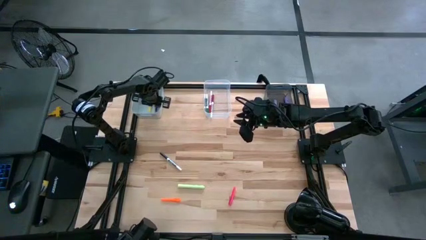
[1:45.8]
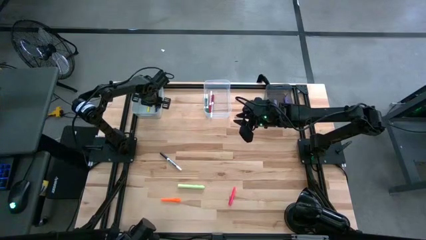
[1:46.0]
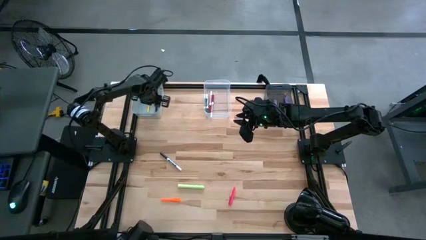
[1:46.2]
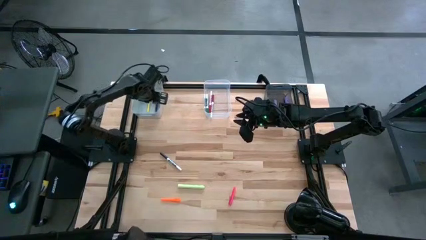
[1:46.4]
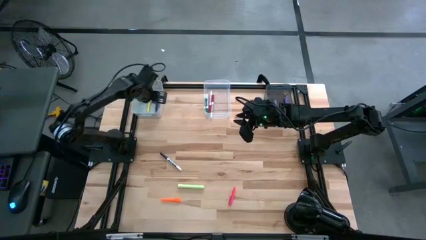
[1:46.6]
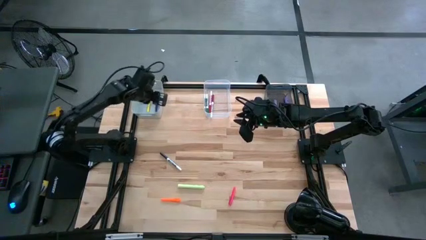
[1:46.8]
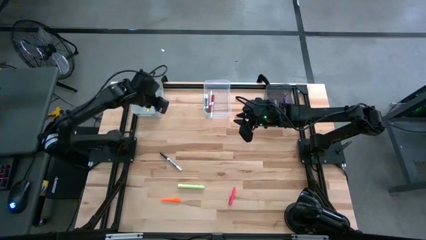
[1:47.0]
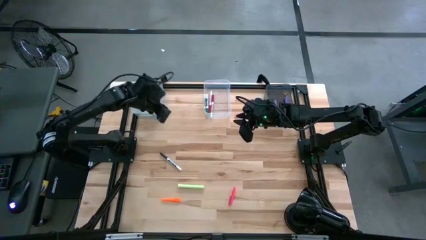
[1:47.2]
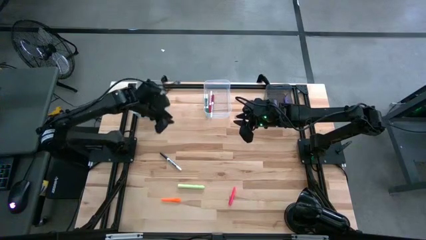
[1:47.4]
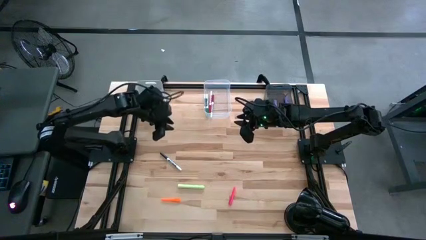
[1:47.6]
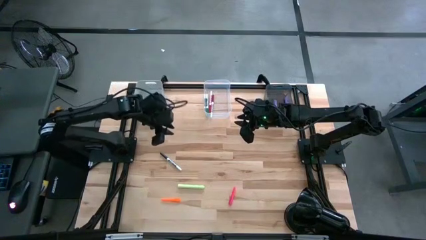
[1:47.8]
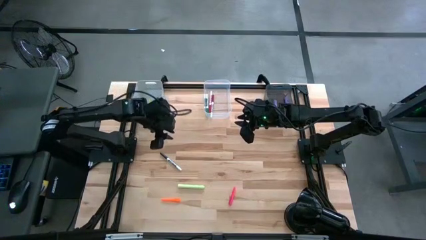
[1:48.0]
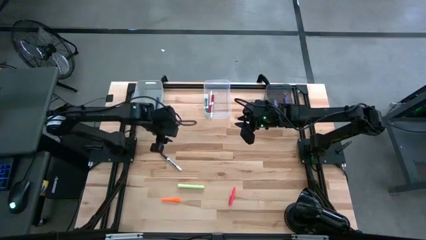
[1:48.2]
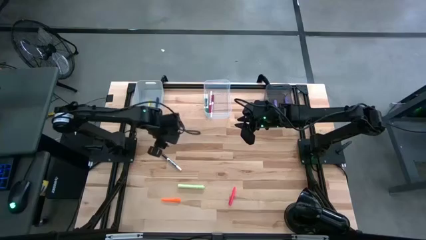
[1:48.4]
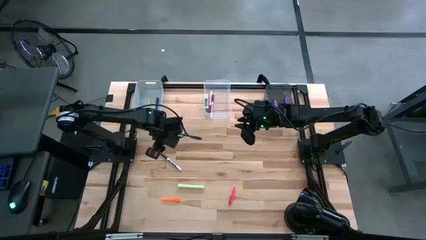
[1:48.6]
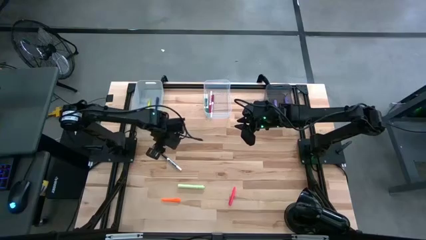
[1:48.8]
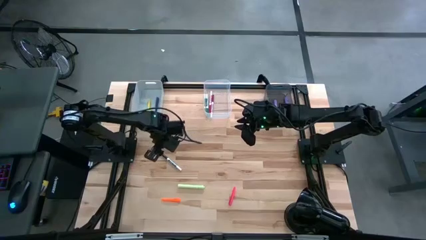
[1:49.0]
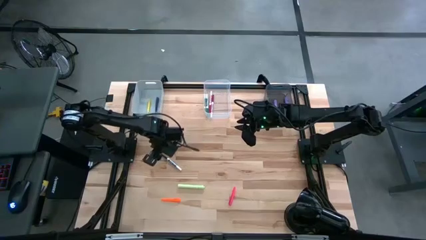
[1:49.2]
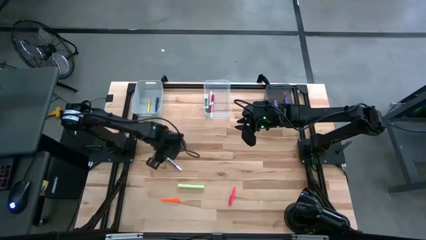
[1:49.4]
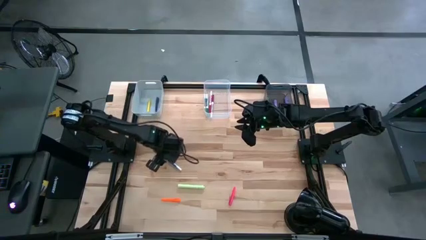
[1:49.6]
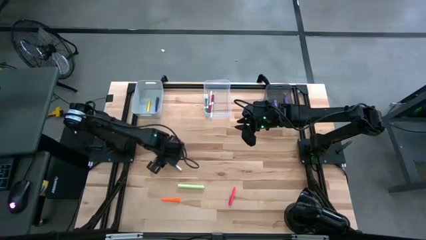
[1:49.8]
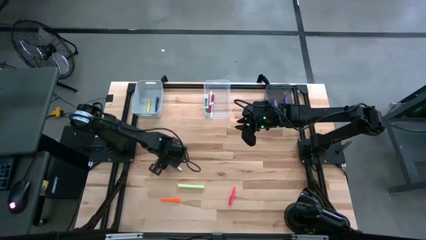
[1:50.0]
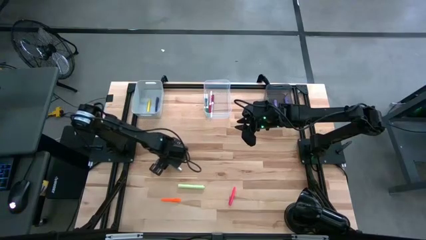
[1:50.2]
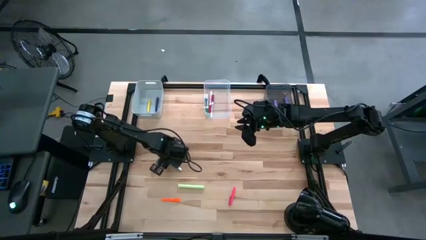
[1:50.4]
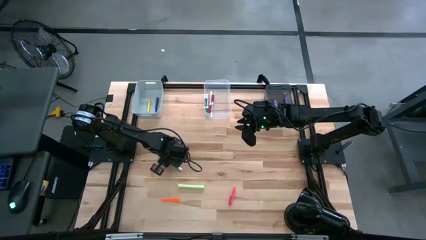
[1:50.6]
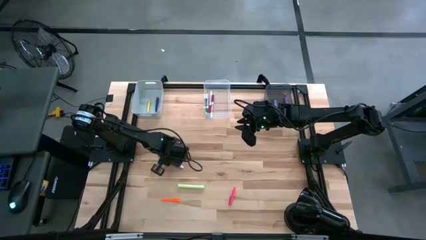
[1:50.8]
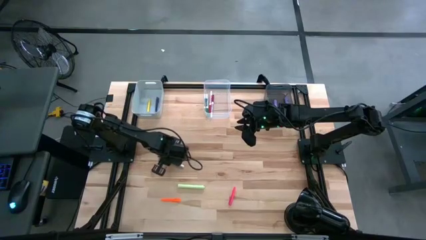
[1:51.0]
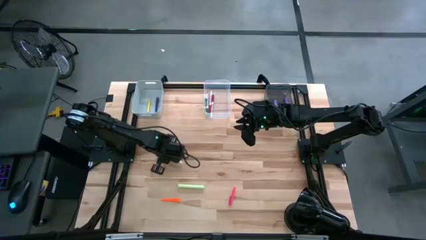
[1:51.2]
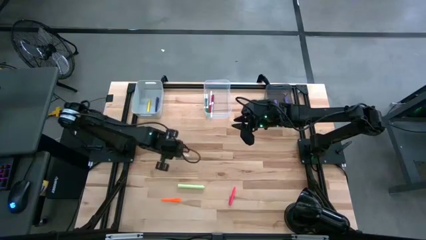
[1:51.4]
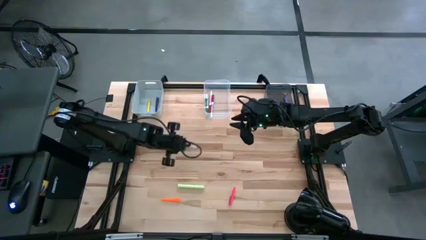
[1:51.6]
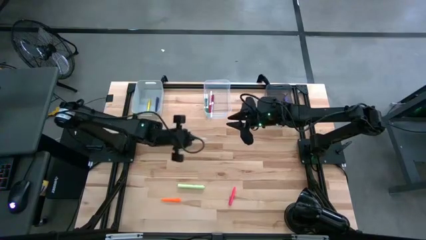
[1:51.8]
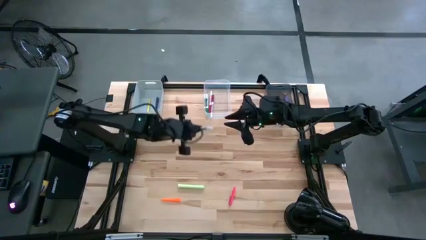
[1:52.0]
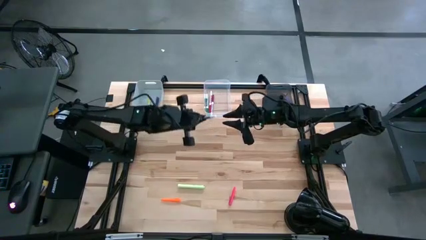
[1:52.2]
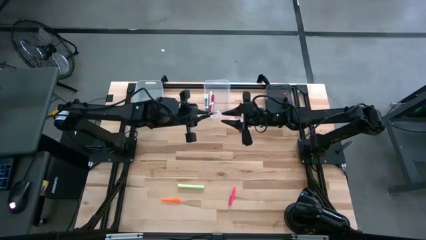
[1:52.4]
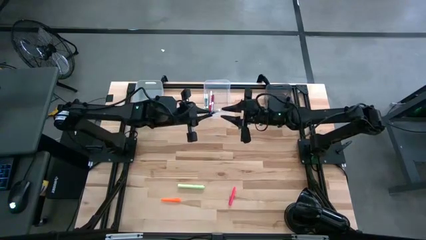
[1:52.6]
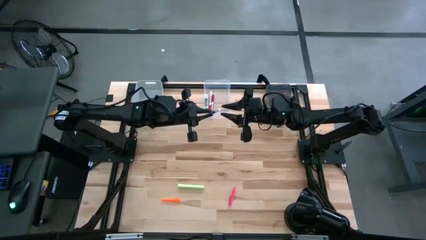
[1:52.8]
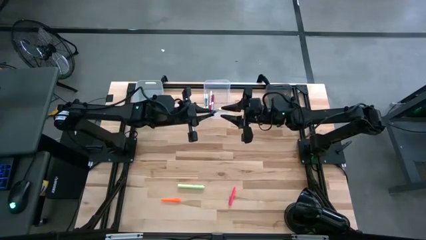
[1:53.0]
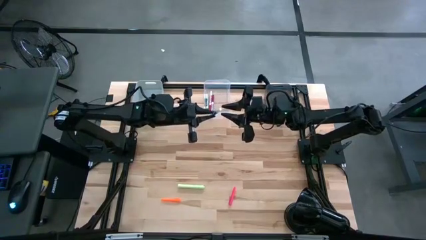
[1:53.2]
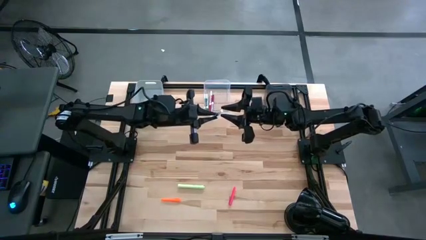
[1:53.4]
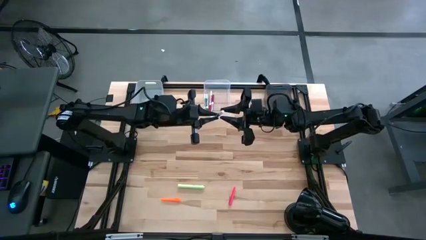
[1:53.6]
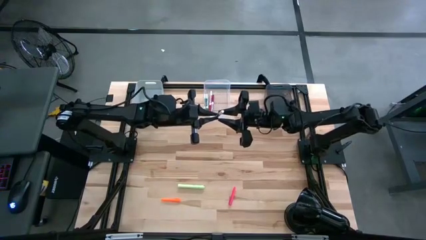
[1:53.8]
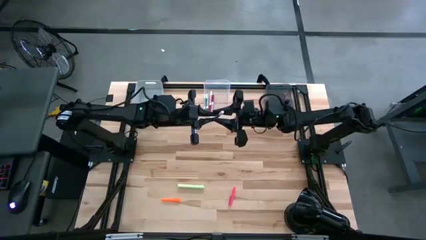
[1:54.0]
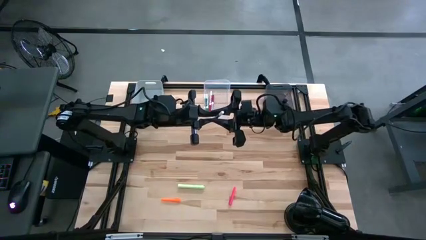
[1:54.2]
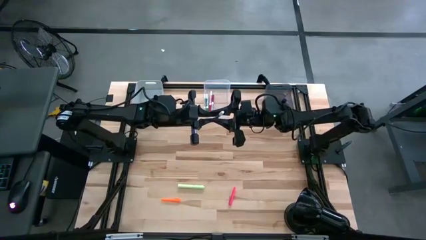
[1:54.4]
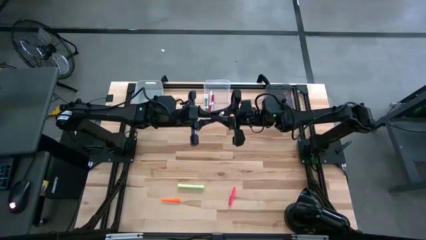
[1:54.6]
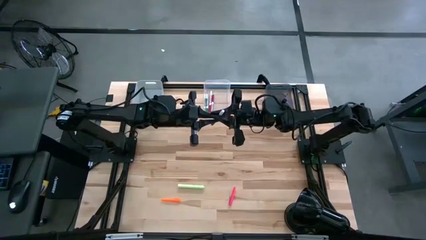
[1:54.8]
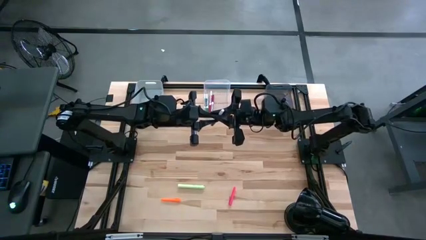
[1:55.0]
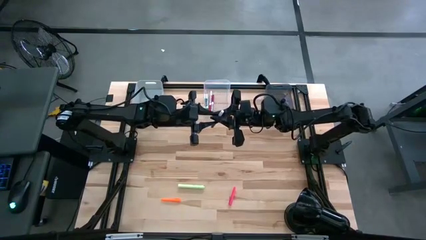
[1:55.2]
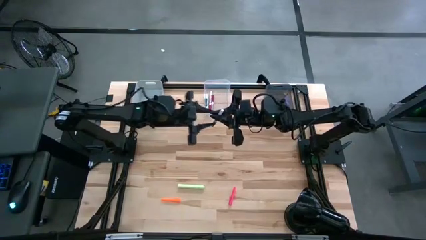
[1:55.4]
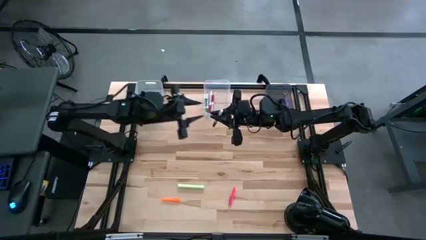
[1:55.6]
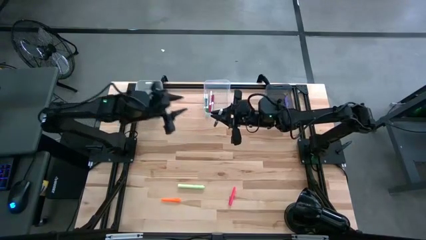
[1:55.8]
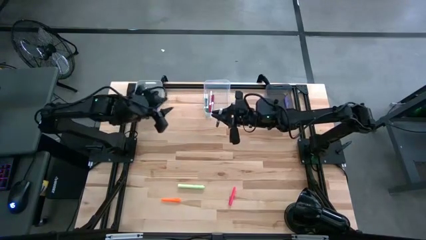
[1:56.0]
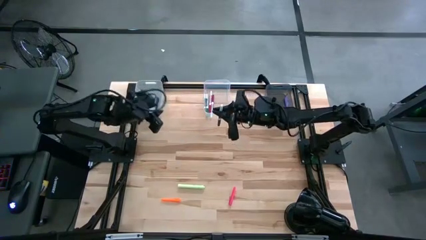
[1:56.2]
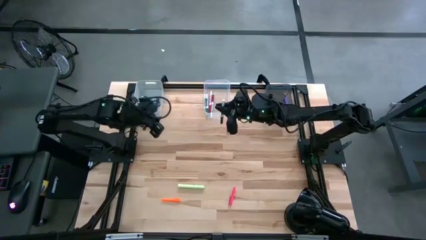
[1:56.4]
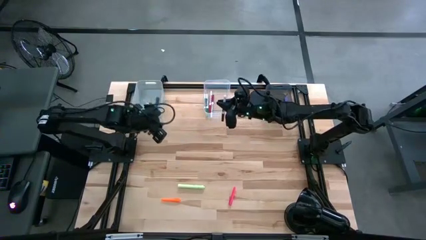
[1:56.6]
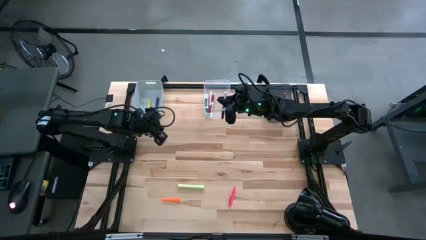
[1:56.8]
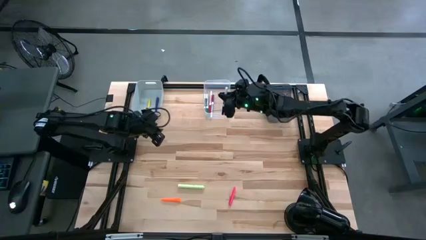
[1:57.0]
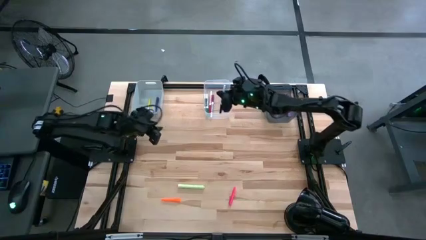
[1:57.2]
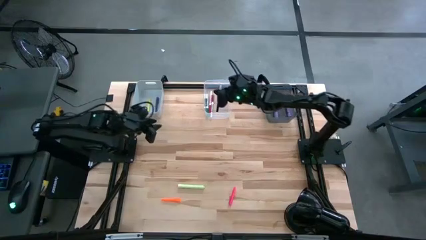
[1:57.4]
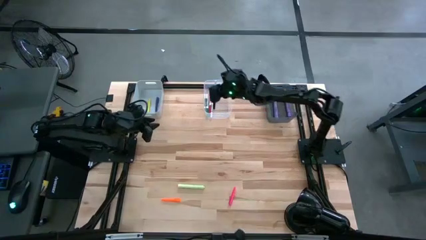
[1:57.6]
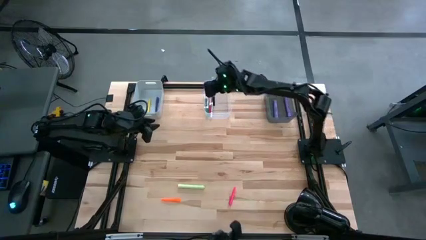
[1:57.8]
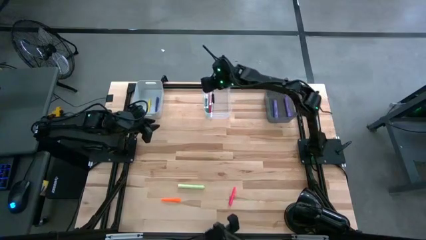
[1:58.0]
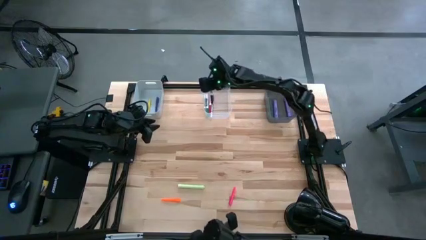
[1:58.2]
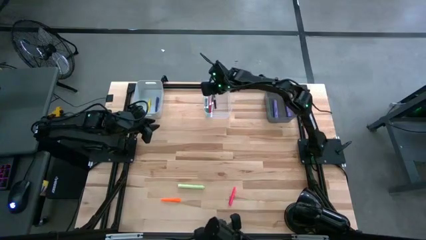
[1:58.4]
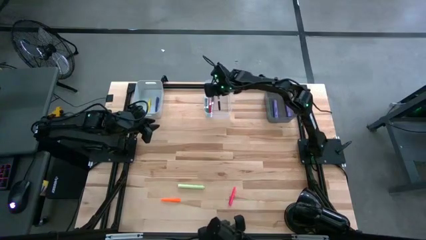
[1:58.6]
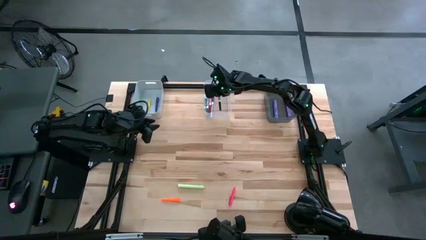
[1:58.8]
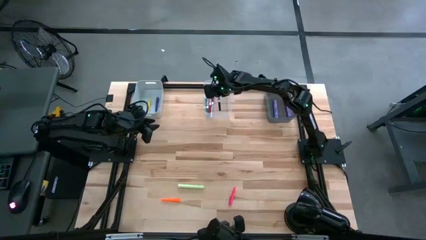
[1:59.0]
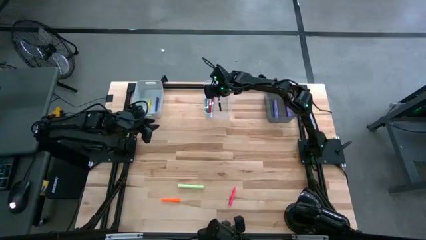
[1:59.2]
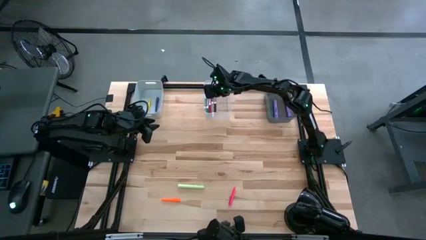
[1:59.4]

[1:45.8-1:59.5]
Task: Pick & Place Markers
Put the black marker pen into the transparent bin
